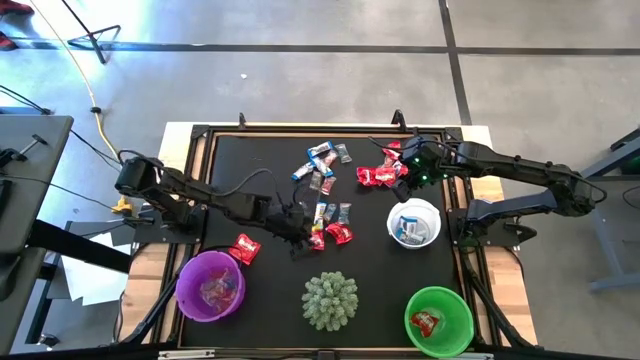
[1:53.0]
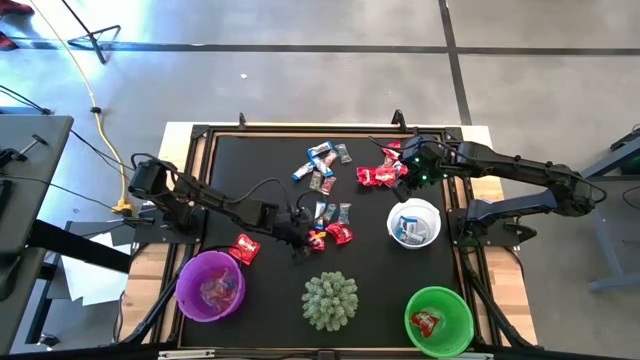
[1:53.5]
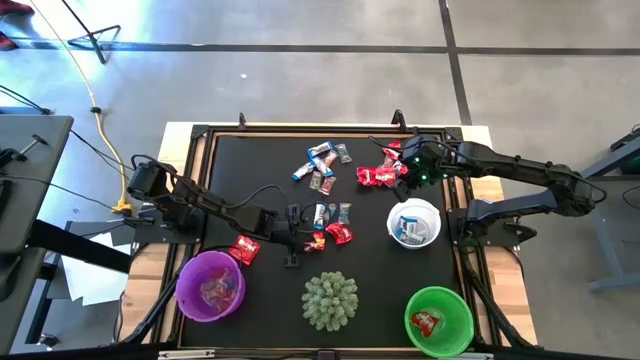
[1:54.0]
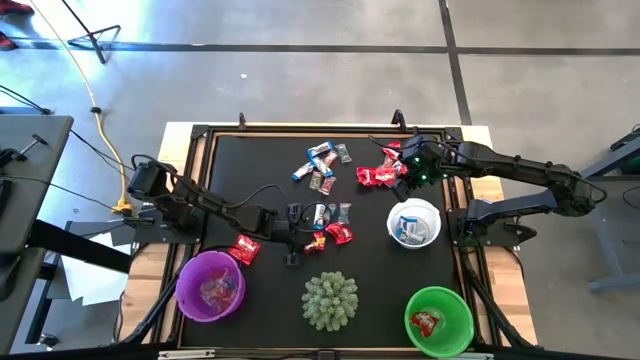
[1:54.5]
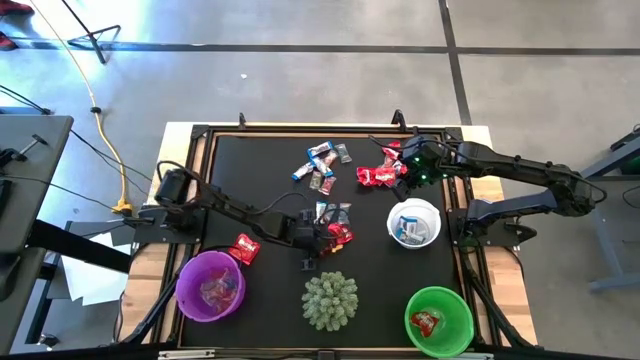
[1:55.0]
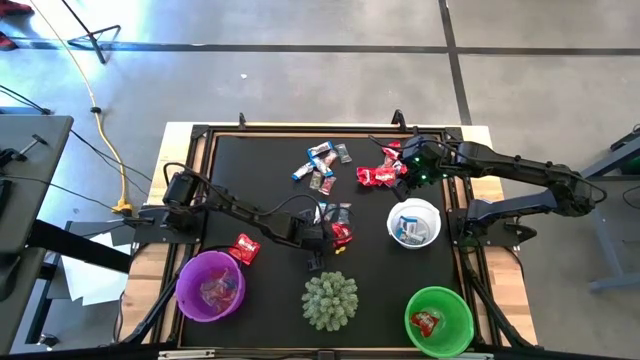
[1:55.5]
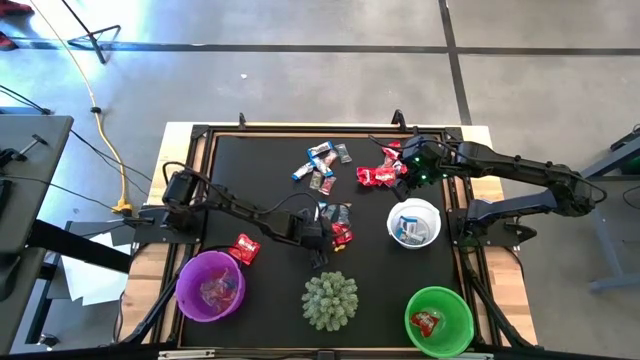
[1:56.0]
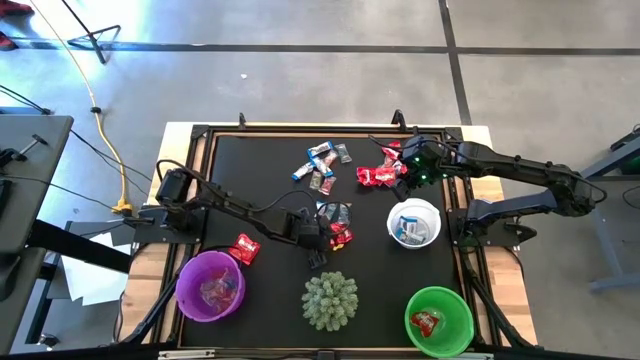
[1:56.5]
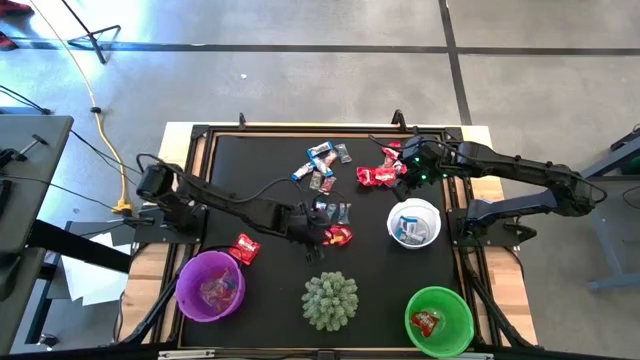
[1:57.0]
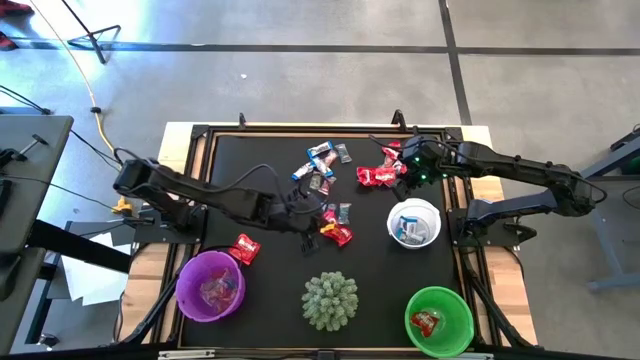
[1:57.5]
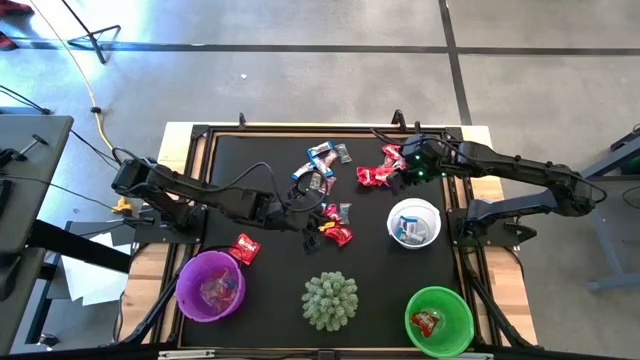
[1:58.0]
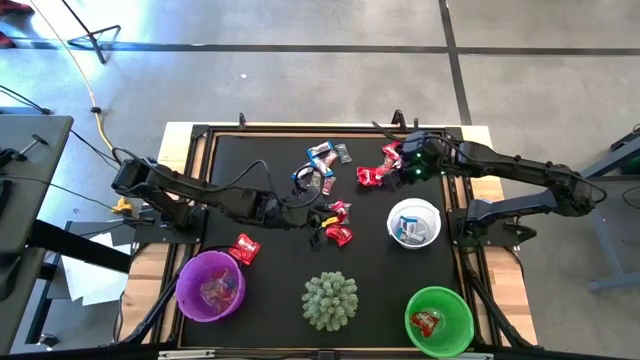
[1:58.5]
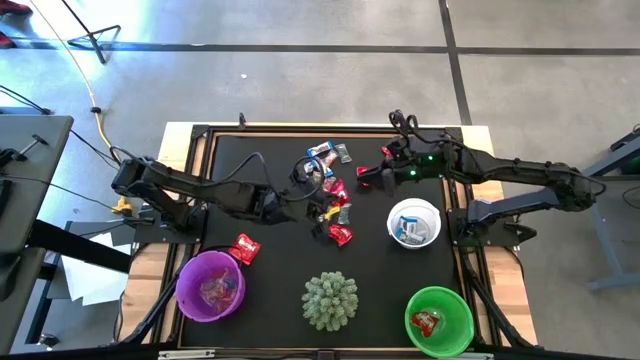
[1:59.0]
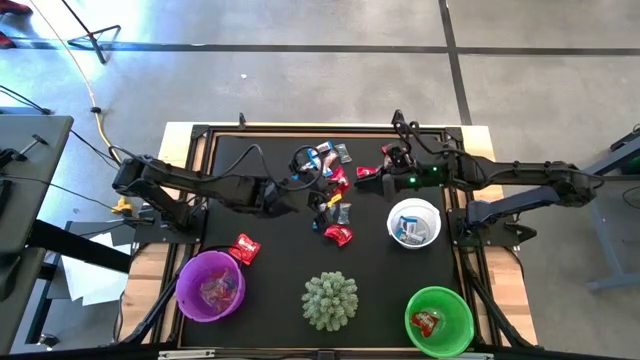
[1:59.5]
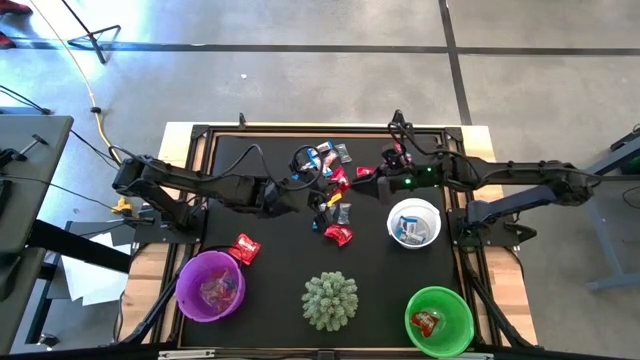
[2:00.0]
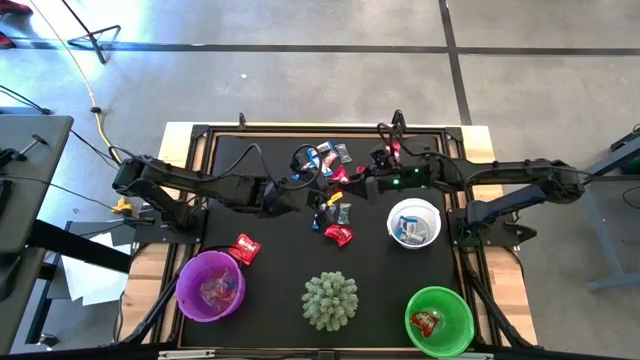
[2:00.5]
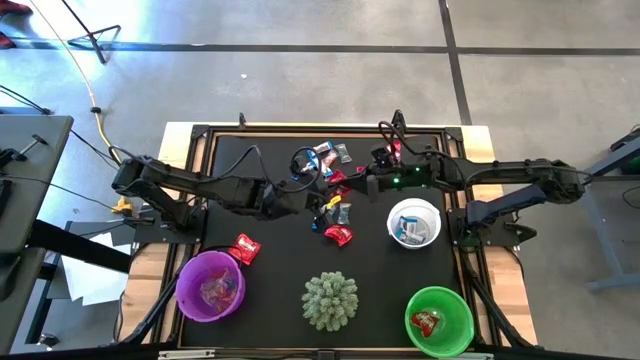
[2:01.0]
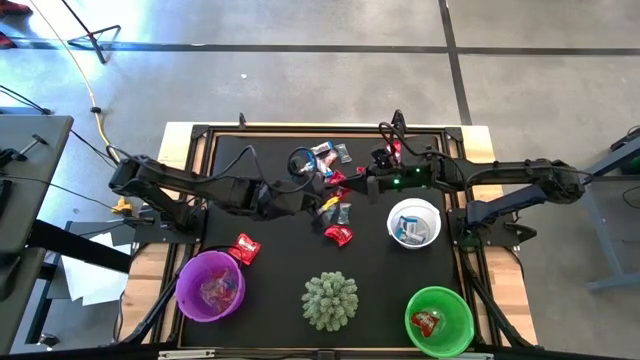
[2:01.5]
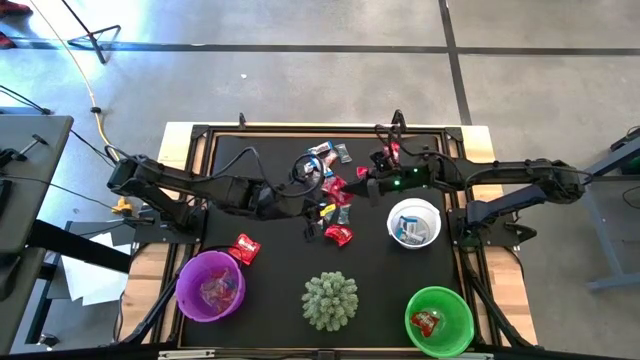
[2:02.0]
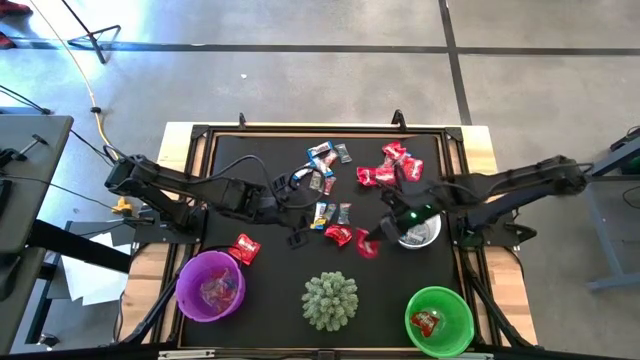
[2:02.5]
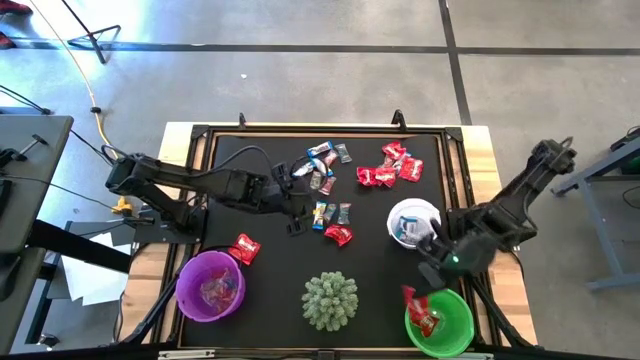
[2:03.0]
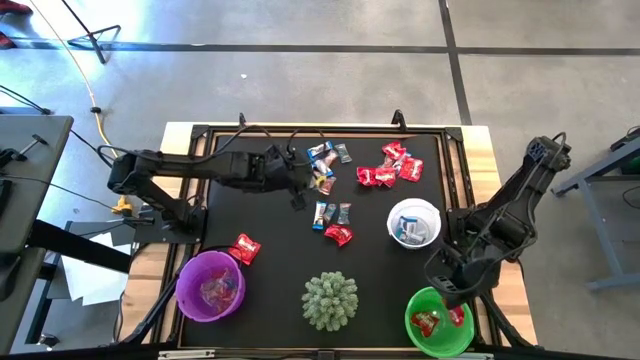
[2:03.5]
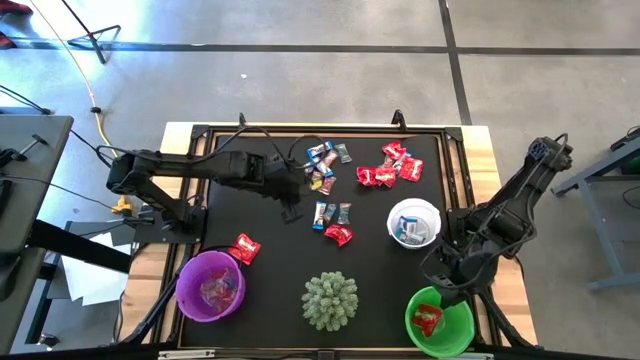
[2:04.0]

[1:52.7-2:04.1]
Task: Sort candy
Put the red candy wrapper into the green bucket

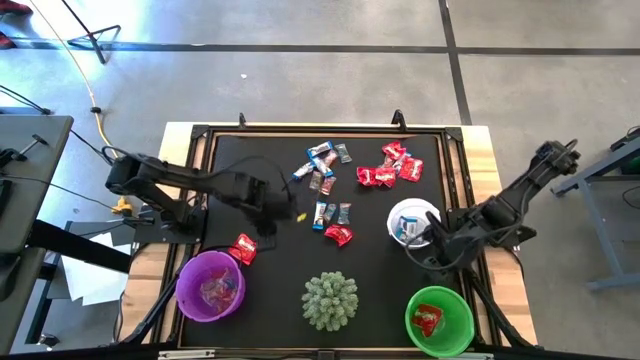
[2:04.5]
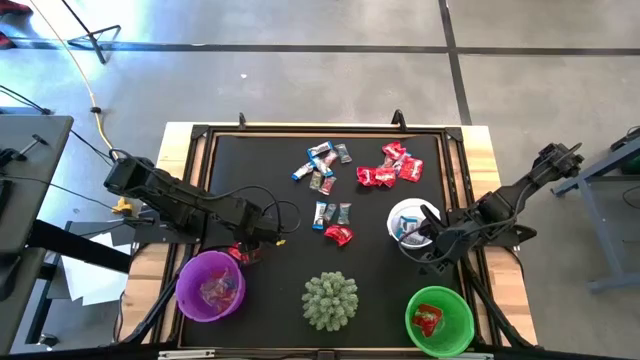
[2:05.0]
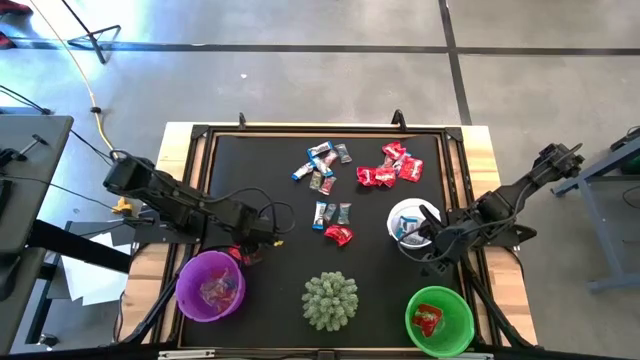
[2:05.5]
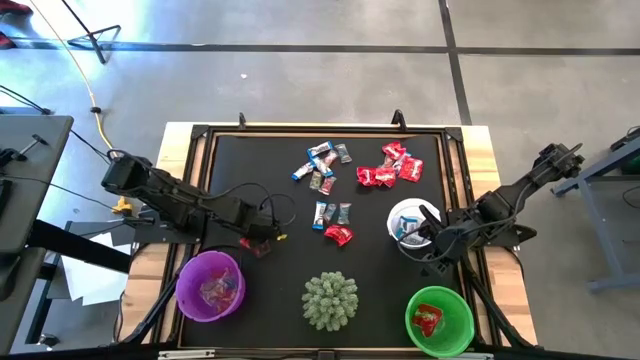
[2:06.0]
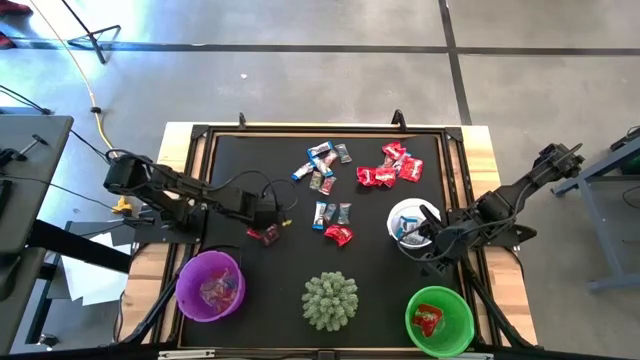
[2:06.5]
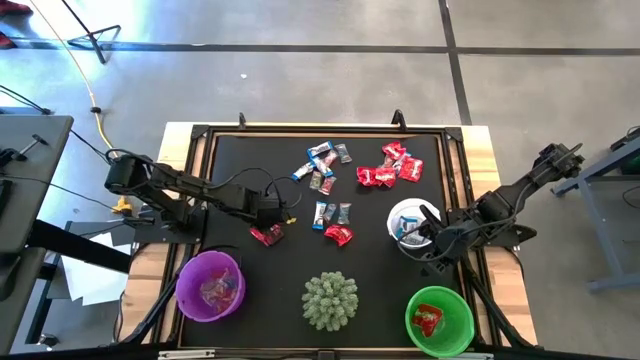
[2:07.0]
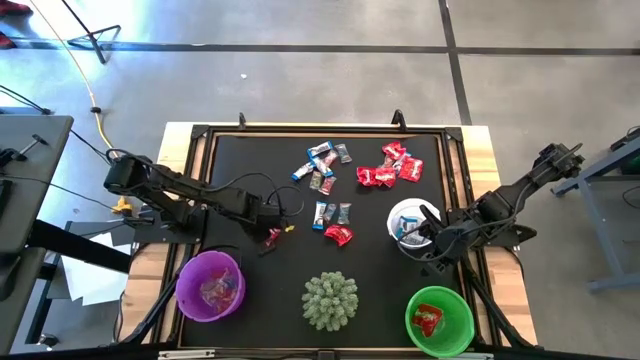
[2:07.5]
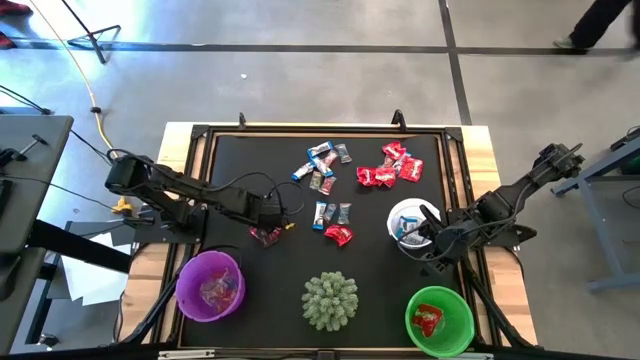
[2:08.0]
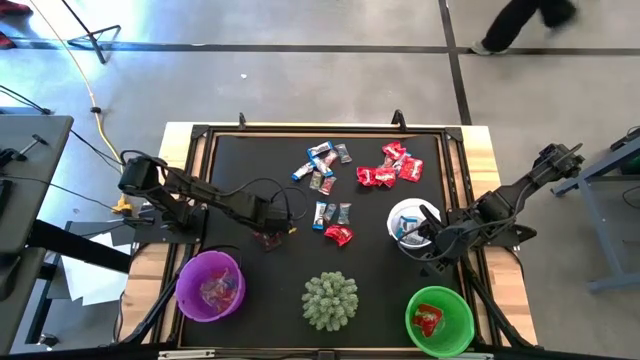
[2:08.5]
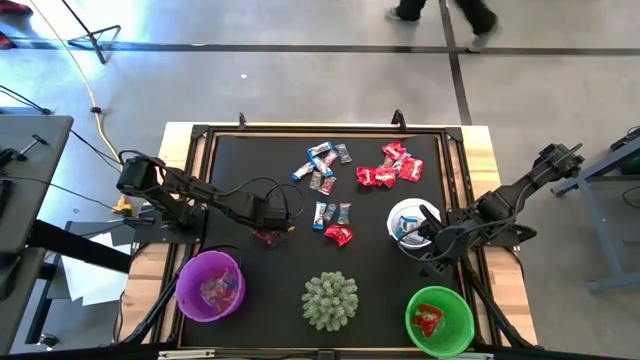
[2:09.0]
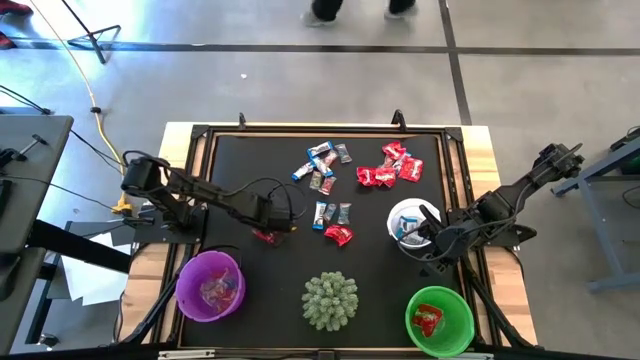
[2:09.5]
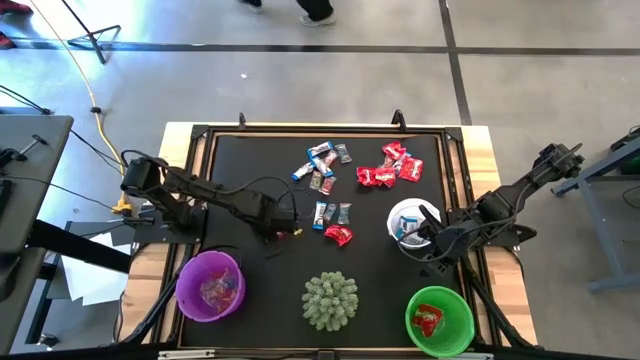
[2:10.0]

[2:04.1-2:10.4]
Put the red candy wrapper into the green bucket

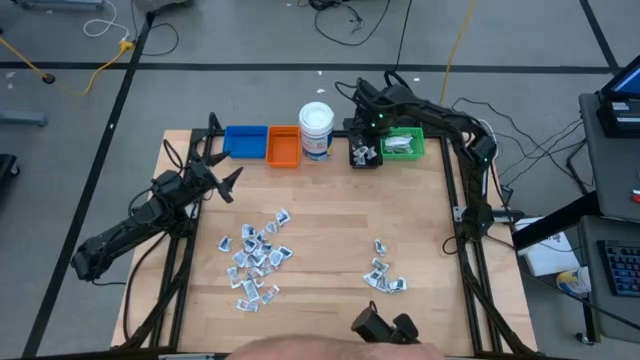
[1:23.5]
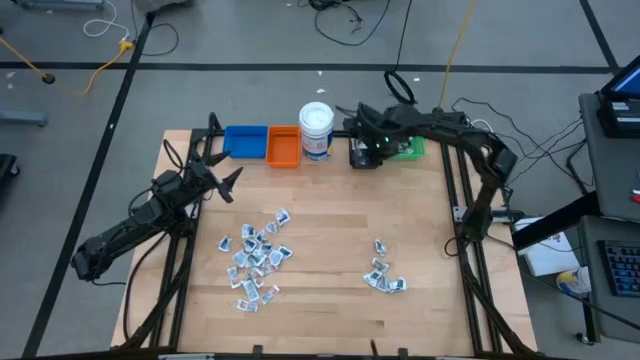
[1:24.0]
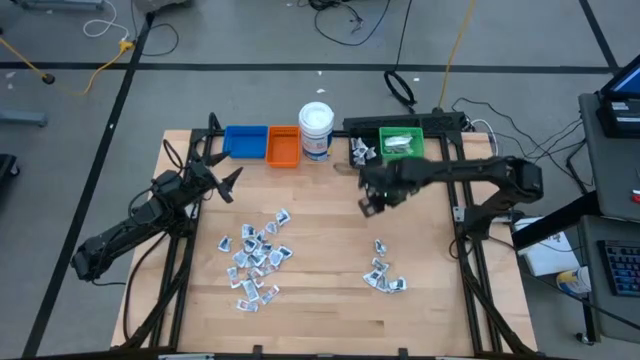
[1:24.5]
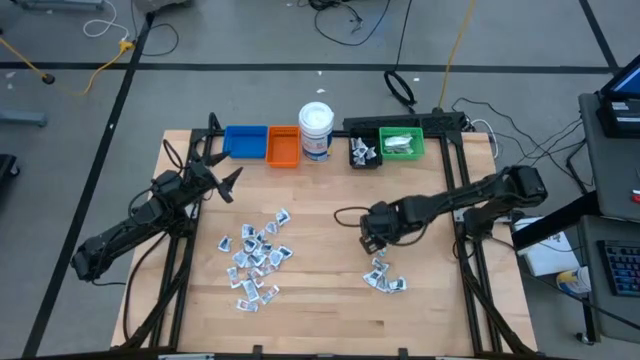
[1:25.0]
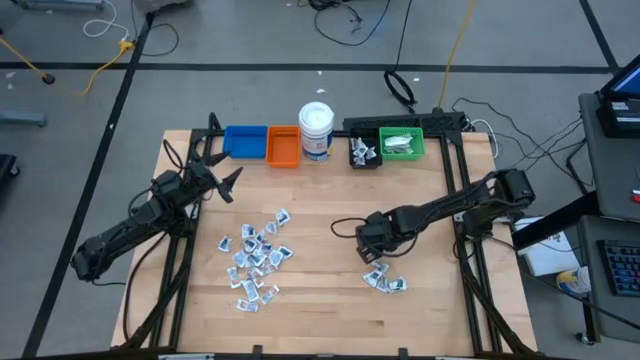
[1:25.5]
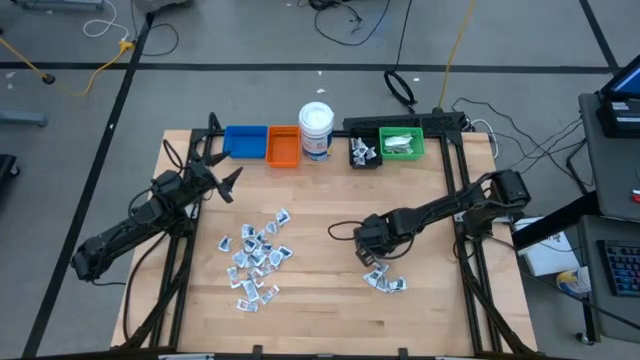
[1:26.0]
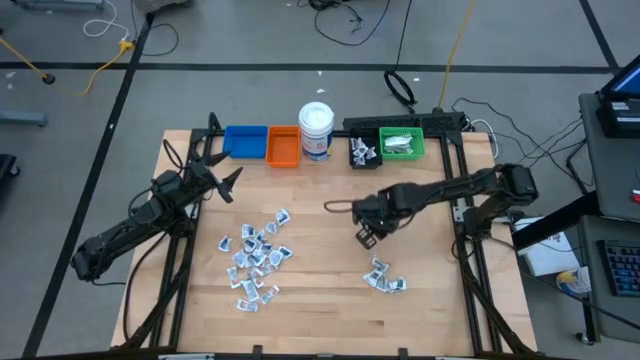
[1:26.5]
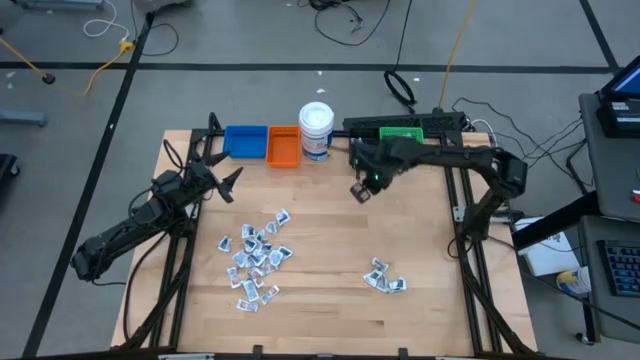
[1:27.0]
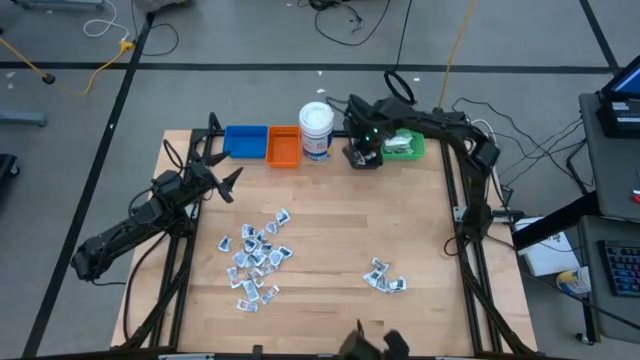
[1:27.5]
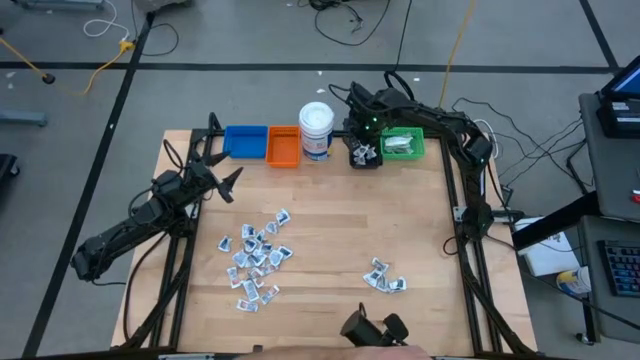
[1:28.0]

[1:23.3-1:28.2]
Task: Pick & Place First Aid Supplies
Put the towelette pack into the black bin
